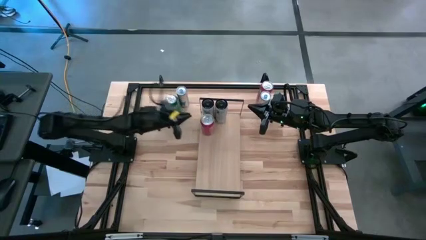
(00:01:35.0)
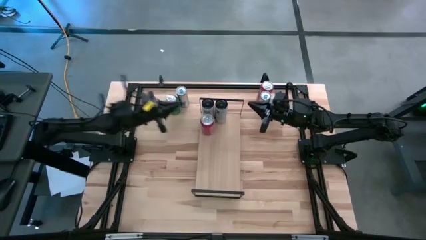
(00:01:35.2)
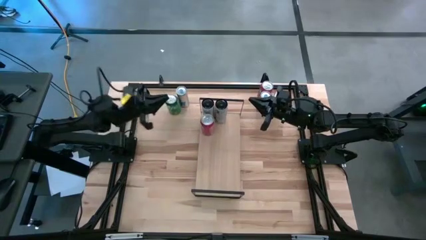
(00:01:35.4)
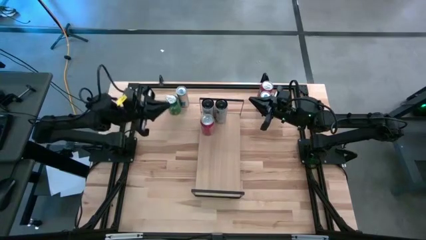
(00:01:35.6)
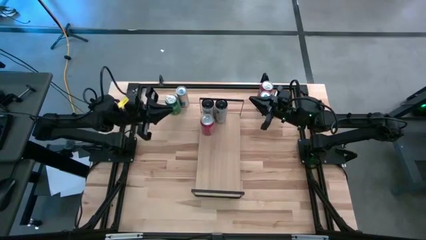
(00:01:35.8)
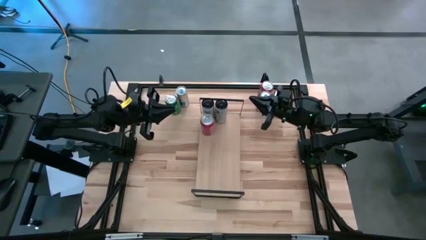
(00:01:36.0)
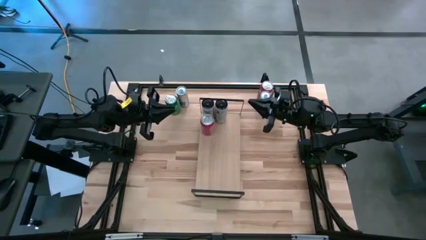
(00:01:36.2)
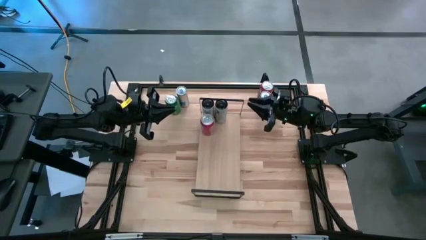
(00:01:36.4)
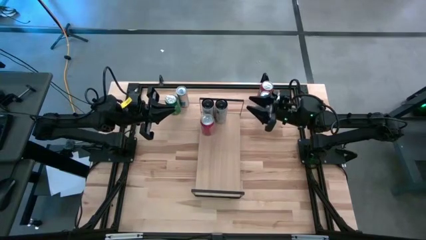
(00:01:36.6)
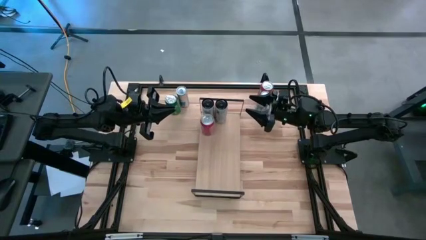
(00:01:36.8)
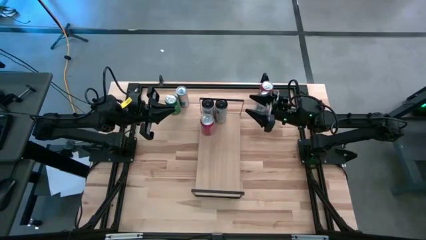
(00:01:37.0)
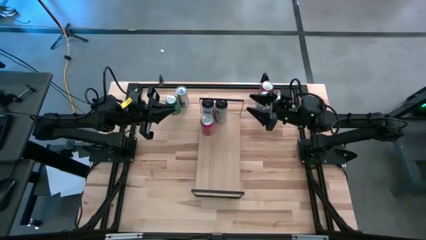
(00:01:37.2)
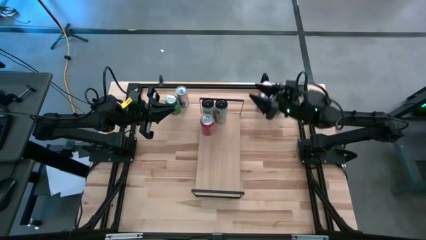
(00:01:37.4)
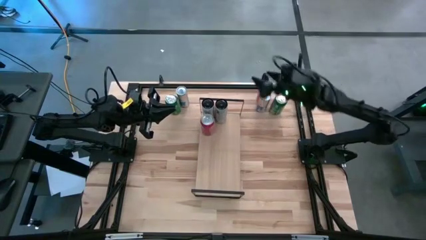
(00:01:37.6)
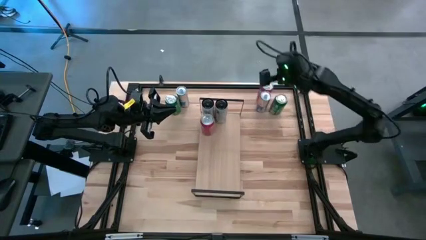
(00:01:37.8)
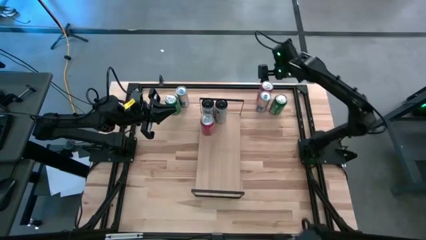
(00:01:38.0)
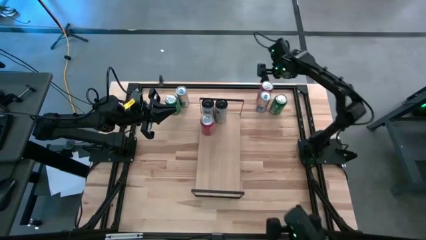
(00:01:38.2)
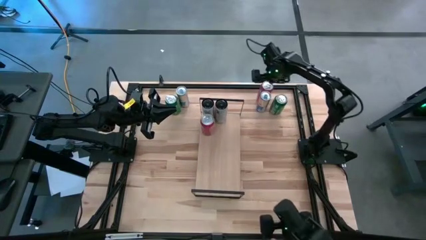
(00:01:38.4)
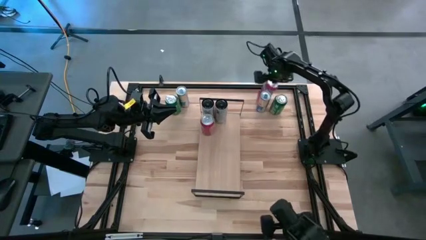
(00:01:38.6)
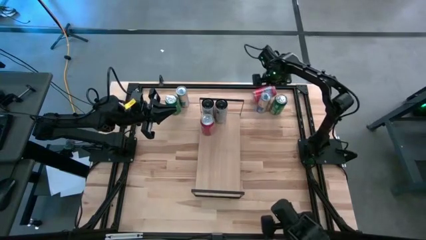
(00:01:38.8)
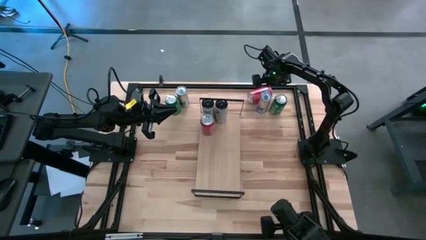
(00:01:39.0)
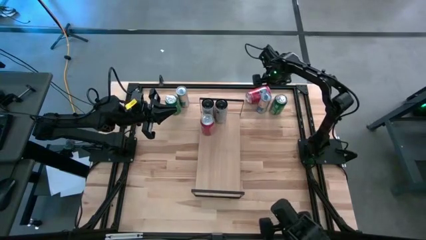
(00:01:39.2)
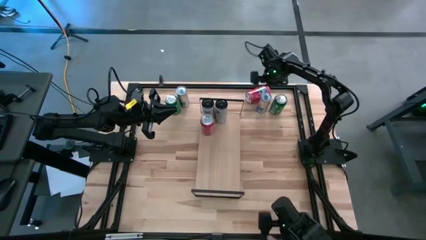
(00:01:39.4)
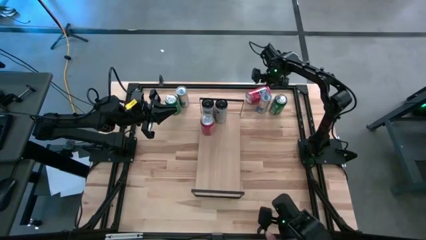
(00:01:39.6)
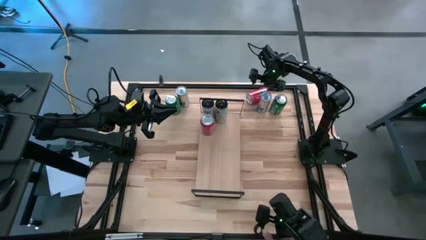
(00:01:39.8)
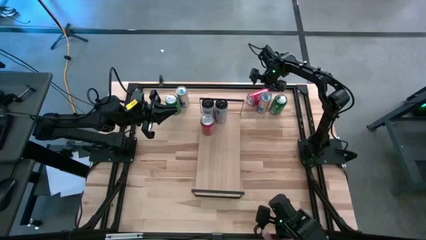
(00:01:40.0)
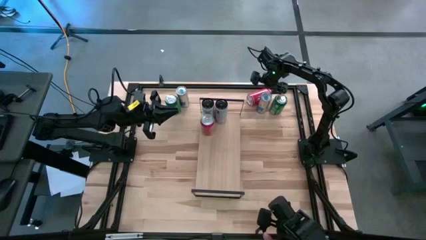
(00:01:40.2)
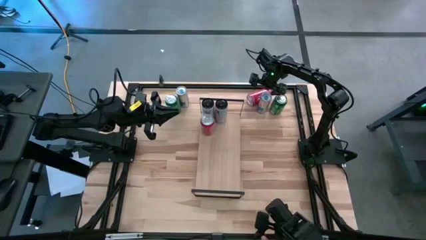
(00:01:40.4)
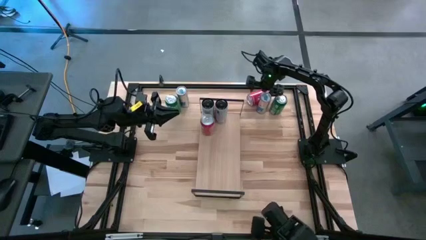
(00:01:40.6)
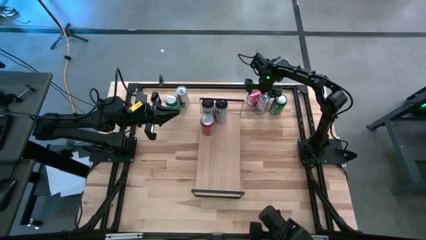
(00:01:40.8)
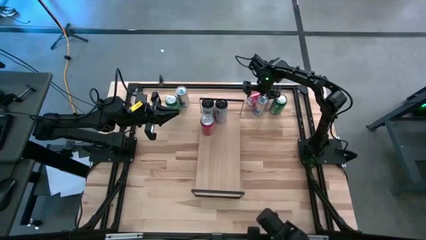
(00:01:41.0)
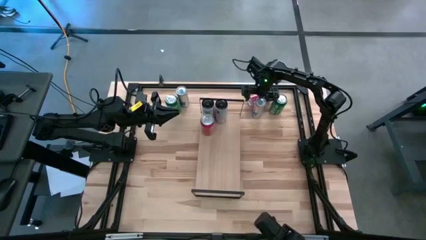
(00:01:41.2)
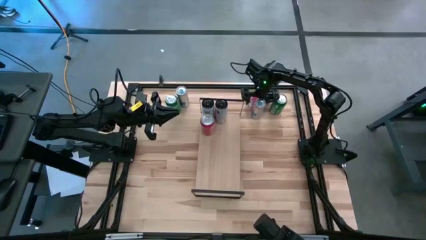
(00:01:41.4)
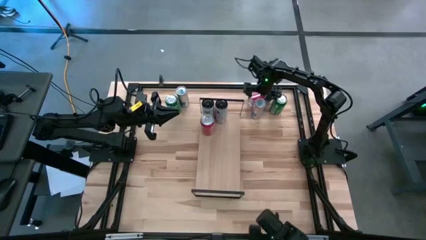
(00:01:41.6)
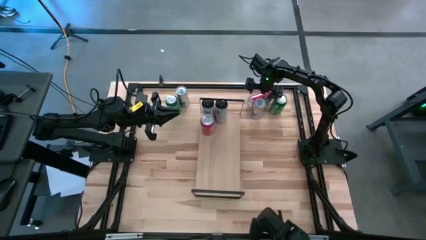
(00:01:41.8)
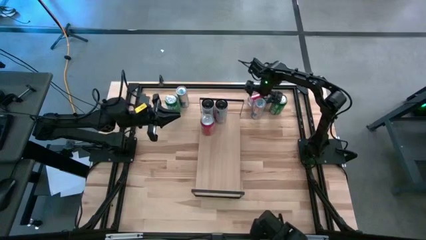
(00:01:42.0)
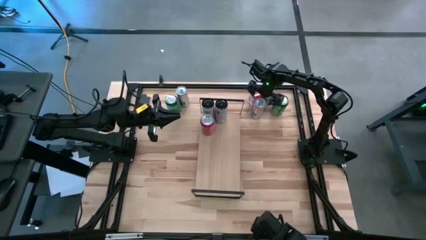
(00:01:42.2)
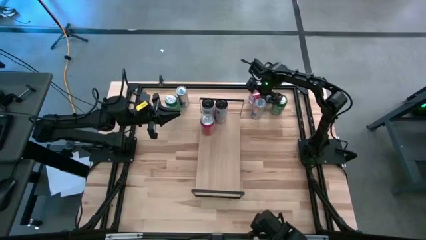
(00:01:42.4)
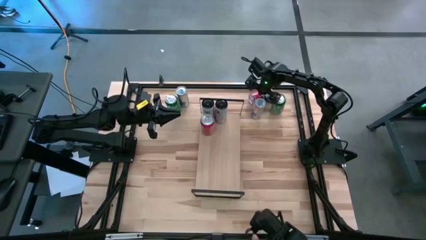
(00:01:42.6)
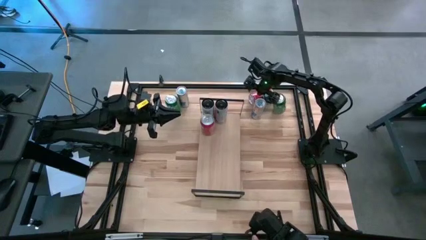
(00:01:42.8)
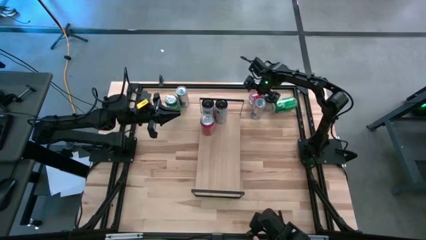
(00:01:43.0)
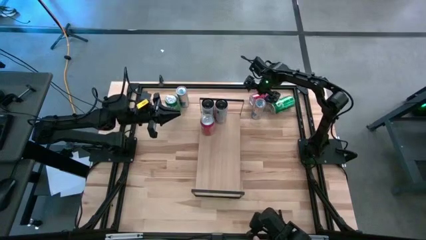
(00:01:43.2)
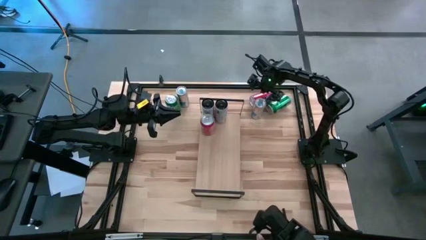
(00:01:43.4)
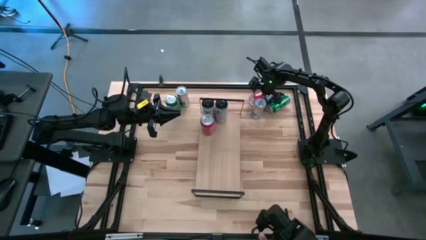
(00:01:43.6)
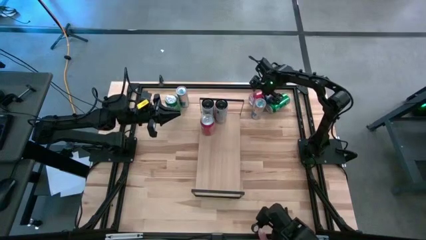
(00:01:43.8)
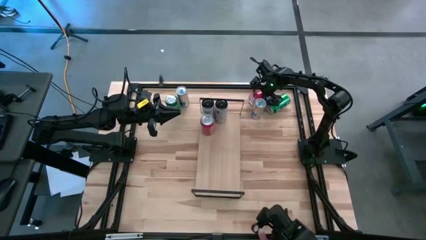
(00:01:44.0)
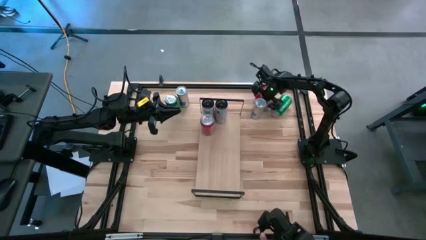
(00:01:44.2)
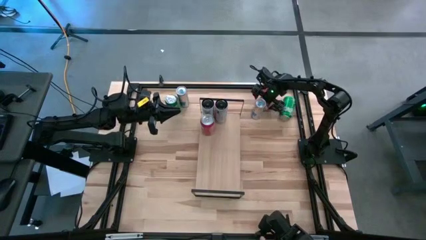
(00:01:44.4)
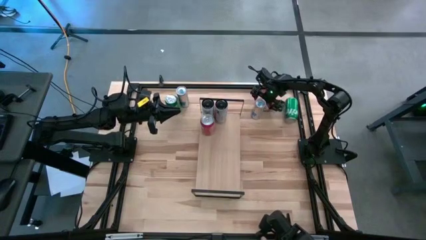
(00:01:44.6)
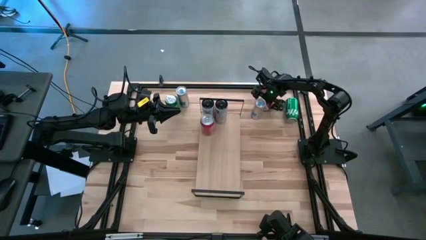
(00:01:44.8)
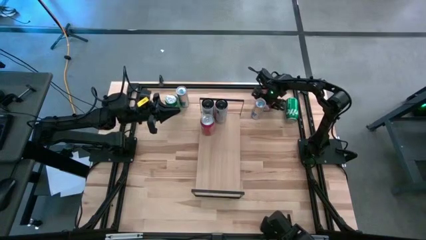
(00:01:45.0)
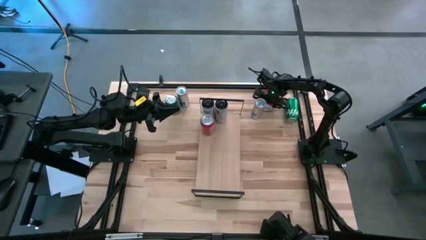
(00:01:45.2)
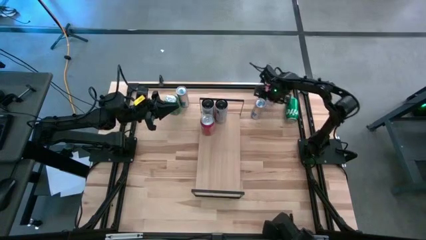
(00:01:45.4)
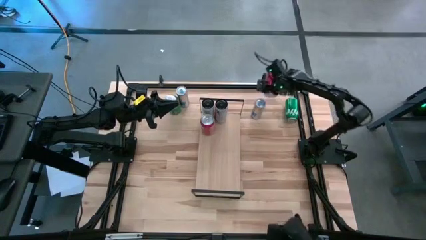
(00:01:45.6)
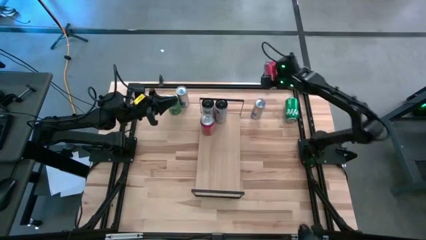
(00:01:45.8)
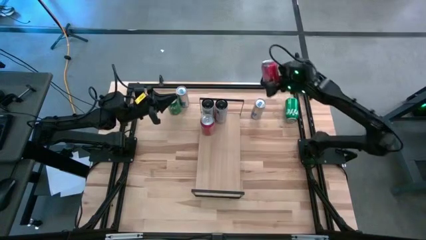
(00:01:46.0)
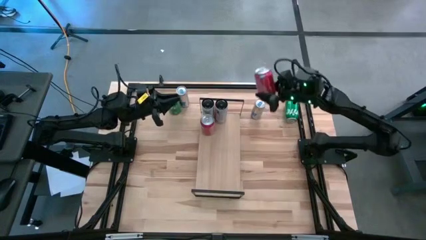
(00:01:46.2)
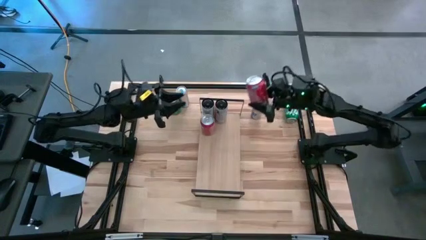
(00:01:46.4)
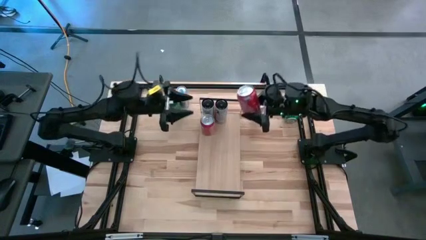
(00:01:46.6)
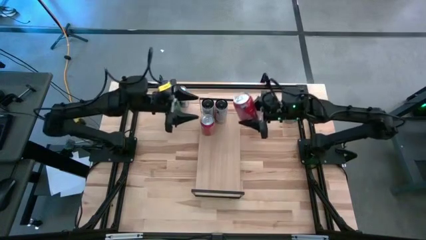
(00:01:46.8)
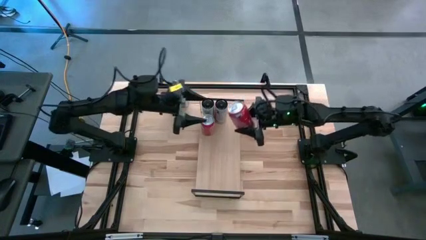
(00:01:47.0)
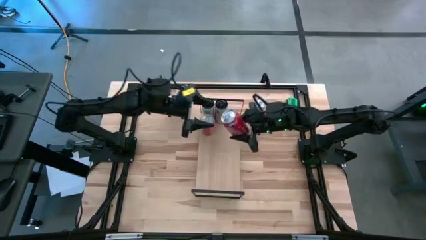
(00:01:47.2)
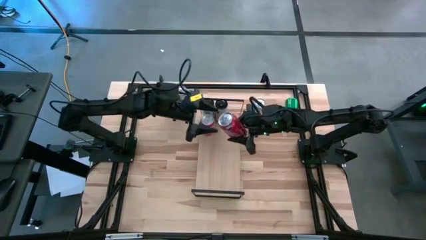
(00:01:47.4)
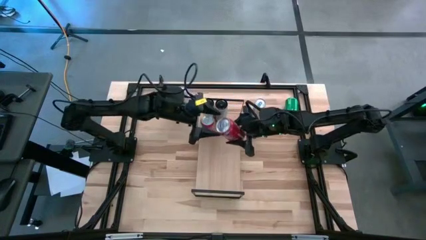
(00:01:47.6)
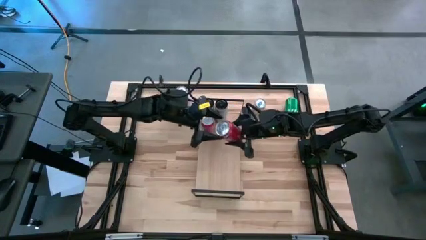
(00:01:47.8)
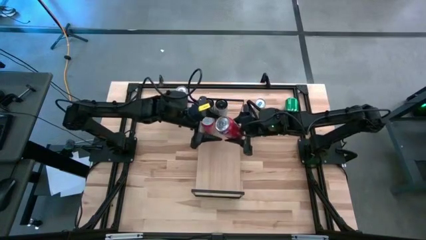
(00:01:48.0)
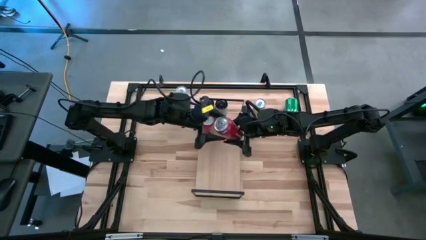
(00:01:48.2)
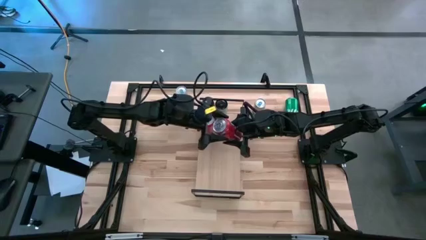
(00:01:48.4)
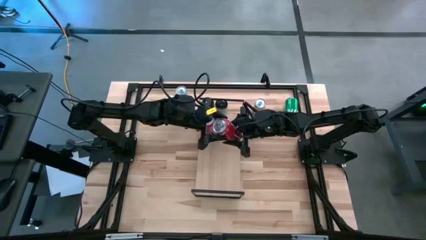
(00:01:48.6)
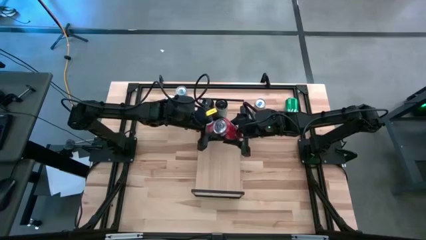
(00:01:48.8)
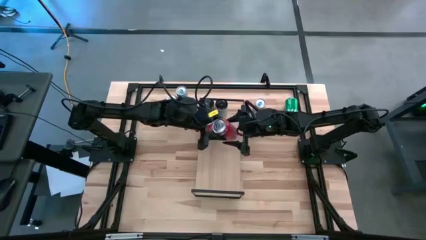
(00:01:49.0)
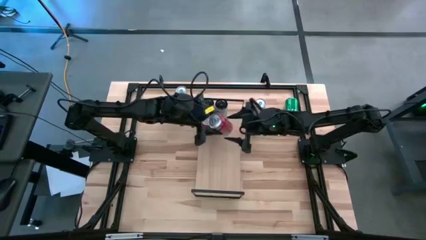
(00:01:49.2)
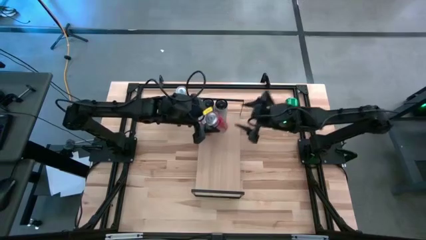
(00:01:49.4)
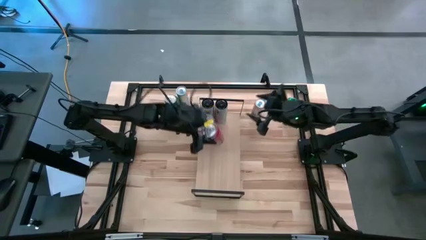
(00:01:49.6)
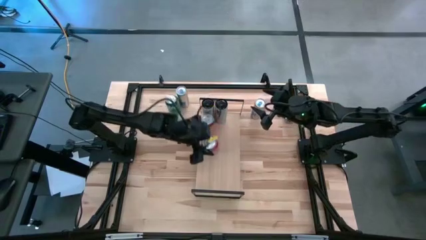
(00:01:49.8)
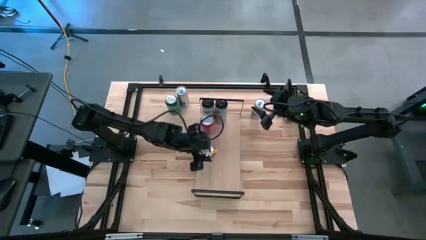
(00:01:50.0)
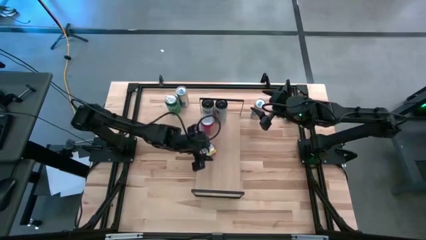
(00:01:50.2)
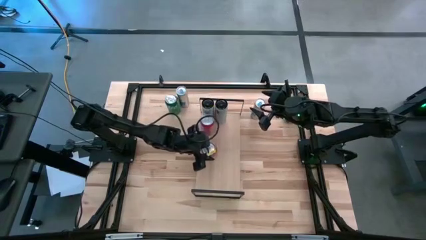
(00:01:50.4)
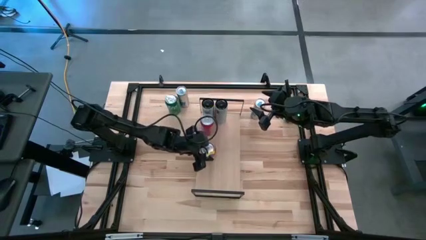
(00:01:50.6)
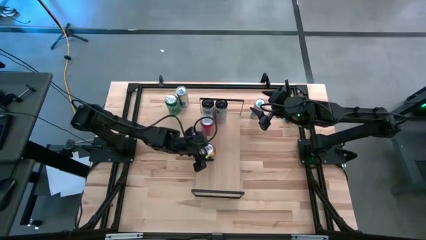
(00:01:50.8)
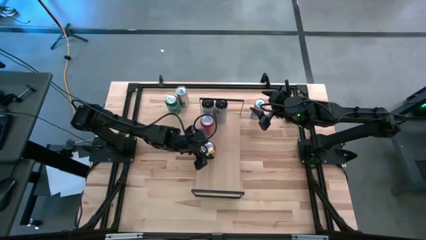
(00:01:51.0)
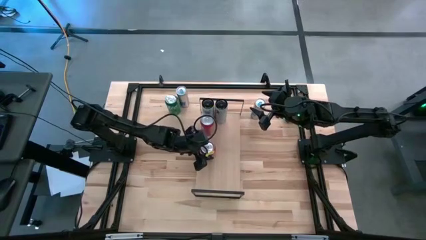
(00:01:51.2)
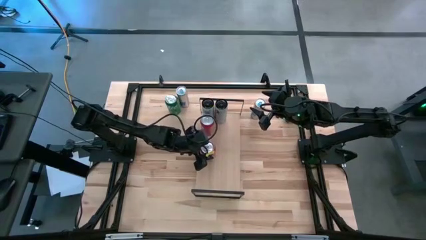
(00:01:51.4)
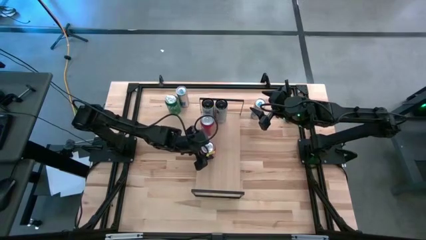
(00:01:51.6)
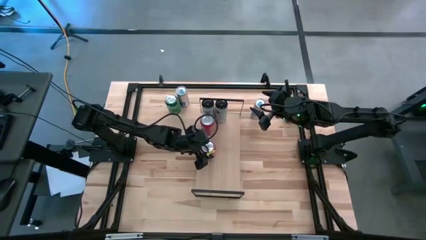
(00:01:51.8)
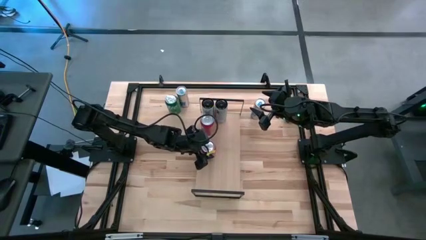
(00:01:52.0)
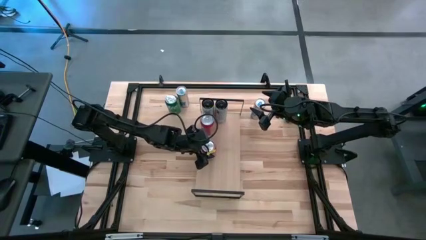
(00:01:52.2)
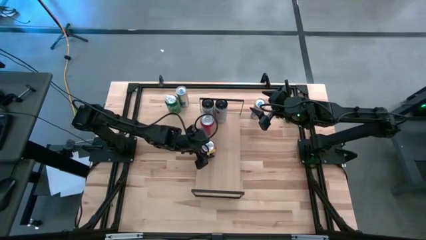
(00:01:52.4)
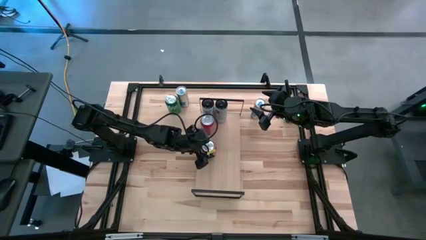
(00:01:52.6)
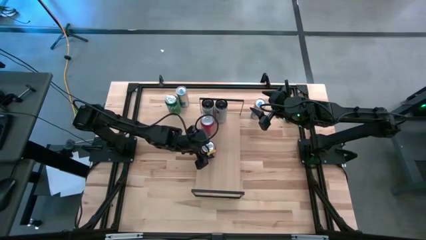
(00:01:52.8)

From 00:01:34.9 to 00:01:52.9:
Task: Place canned beverage on shelf
Put the left red soda can, aligned with the other red soda can on the shelf
